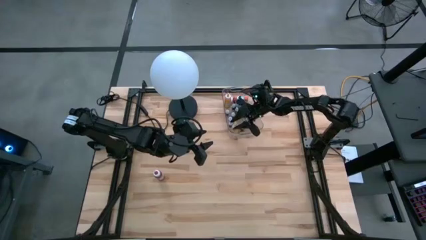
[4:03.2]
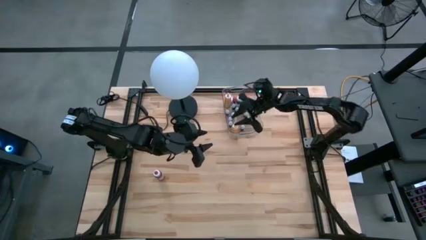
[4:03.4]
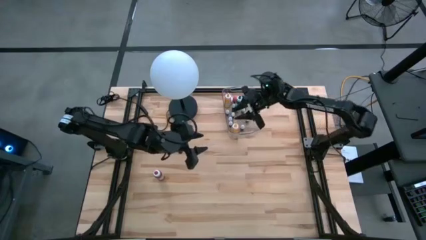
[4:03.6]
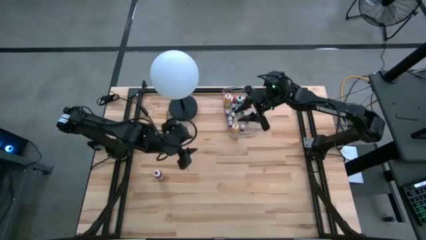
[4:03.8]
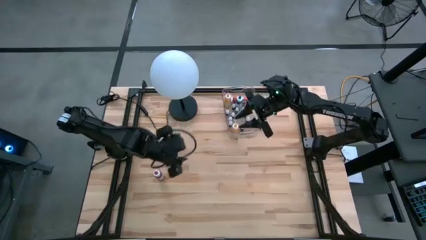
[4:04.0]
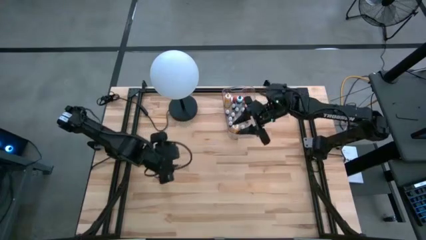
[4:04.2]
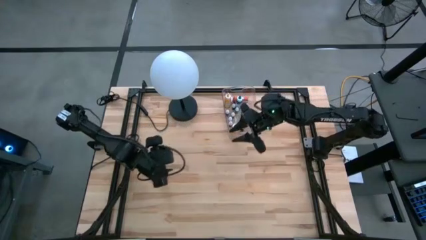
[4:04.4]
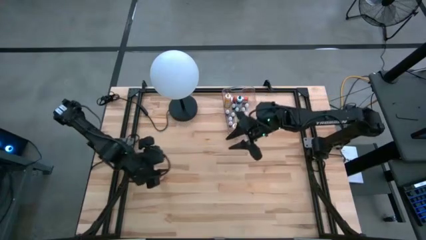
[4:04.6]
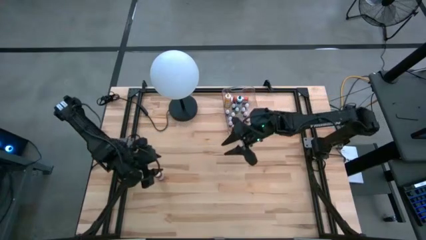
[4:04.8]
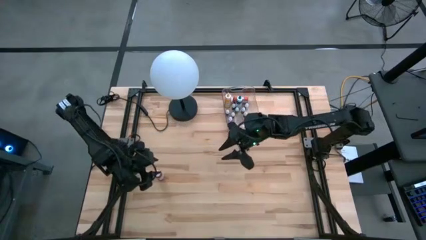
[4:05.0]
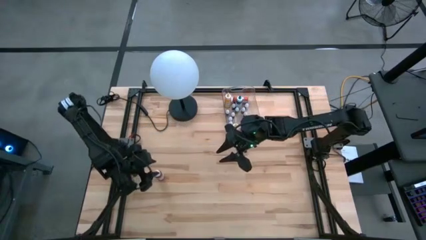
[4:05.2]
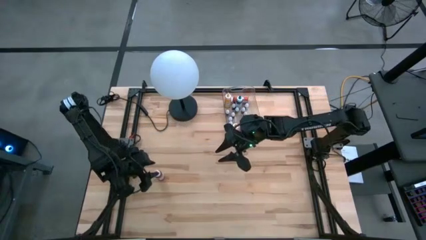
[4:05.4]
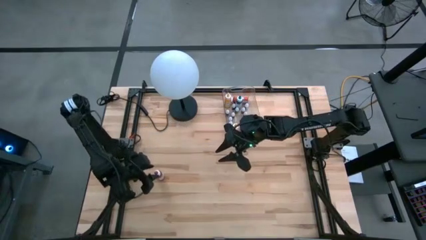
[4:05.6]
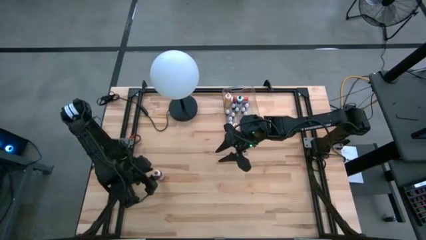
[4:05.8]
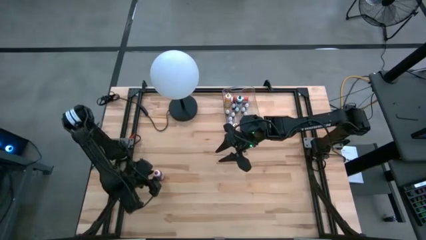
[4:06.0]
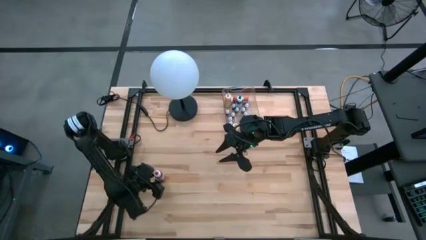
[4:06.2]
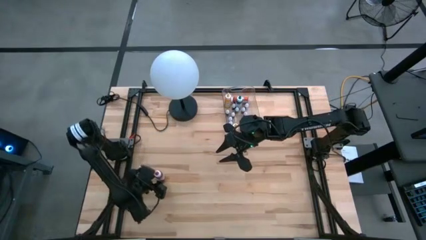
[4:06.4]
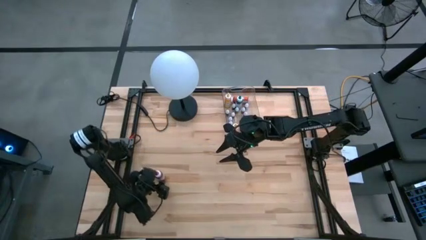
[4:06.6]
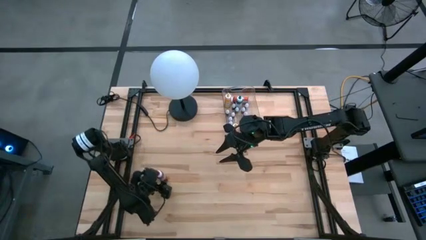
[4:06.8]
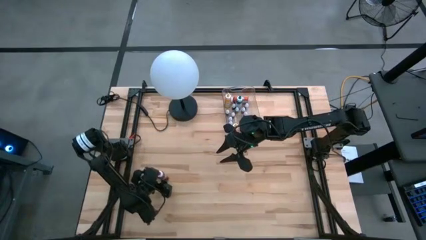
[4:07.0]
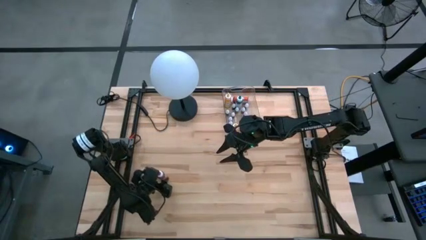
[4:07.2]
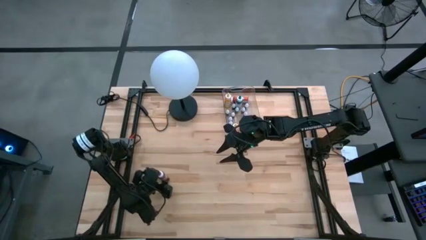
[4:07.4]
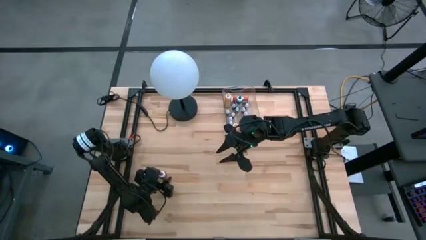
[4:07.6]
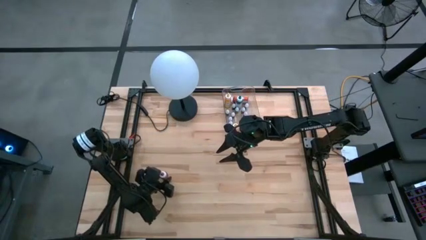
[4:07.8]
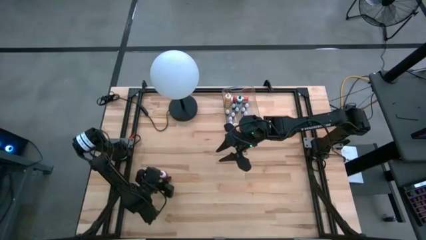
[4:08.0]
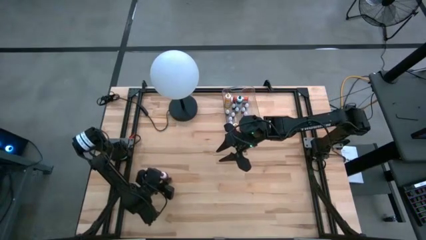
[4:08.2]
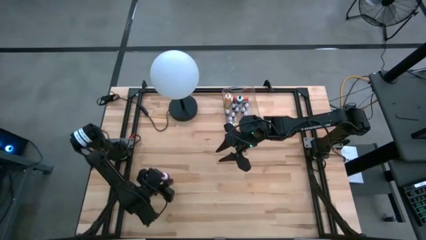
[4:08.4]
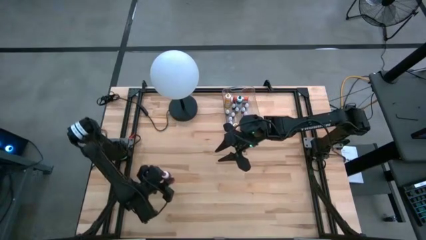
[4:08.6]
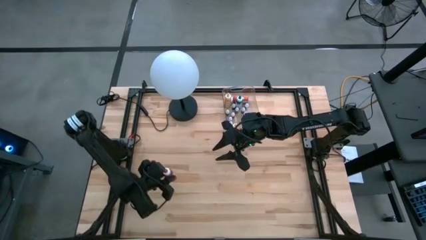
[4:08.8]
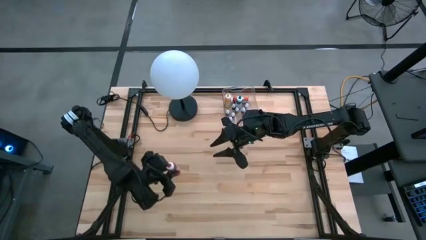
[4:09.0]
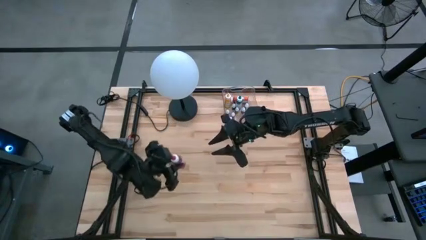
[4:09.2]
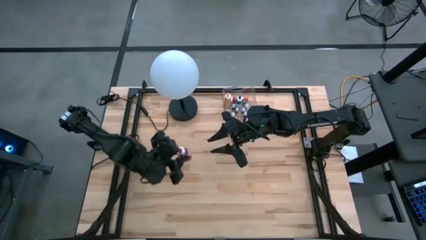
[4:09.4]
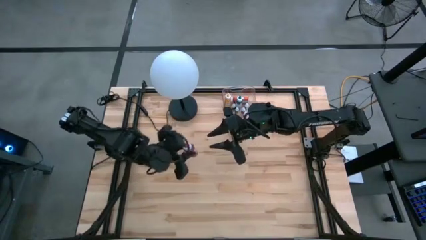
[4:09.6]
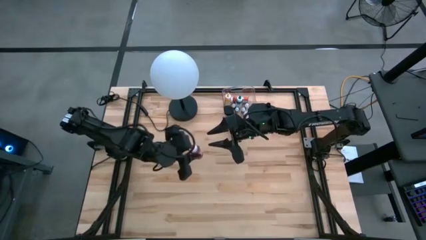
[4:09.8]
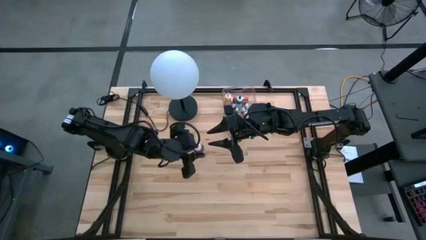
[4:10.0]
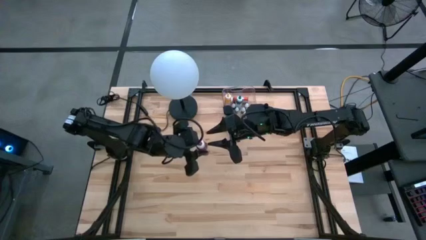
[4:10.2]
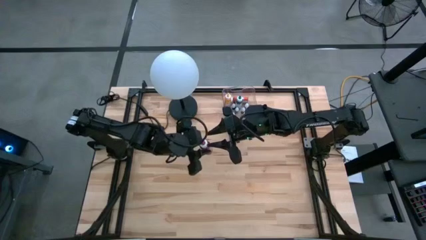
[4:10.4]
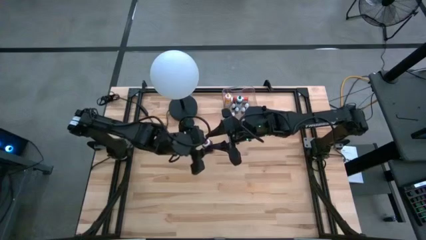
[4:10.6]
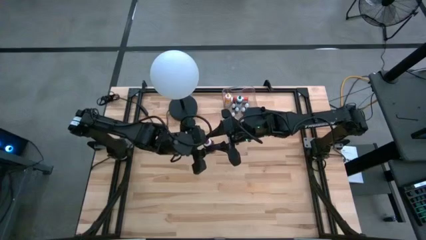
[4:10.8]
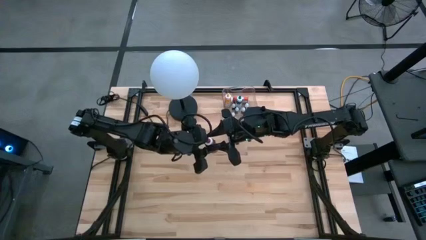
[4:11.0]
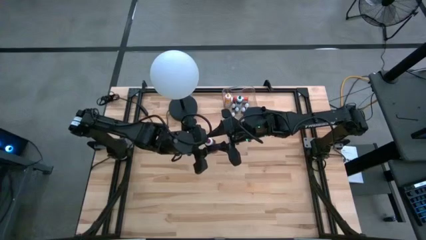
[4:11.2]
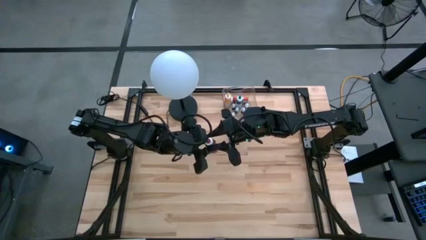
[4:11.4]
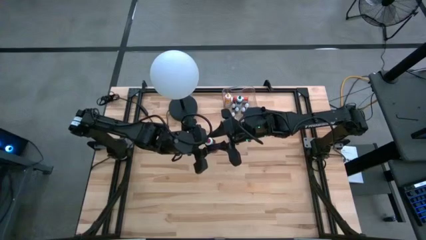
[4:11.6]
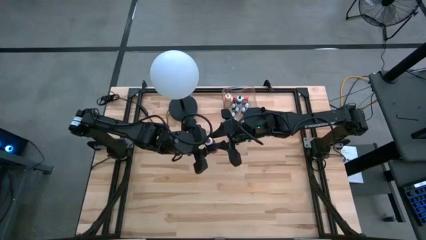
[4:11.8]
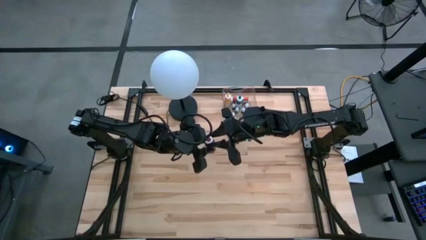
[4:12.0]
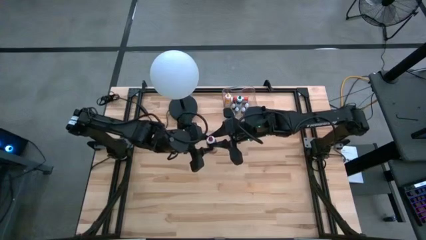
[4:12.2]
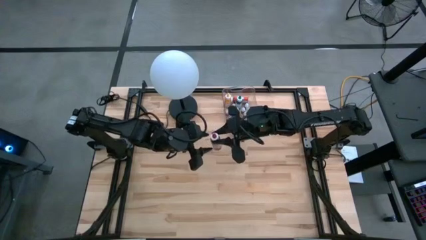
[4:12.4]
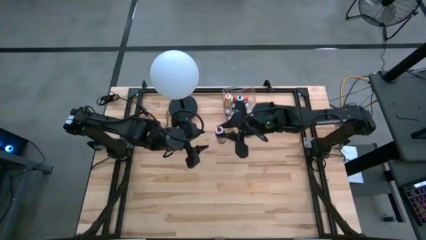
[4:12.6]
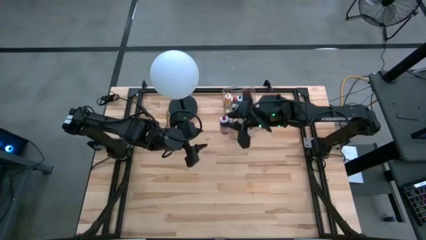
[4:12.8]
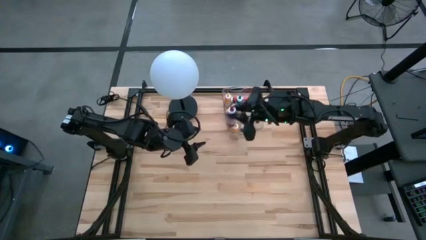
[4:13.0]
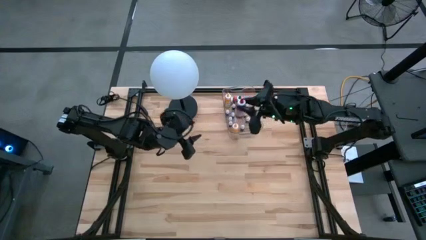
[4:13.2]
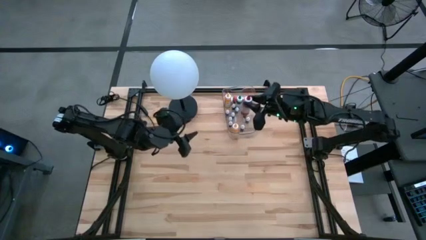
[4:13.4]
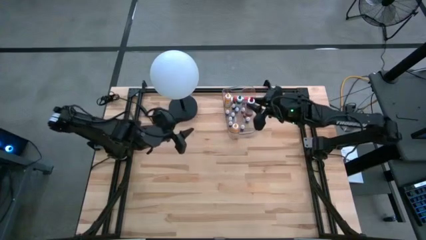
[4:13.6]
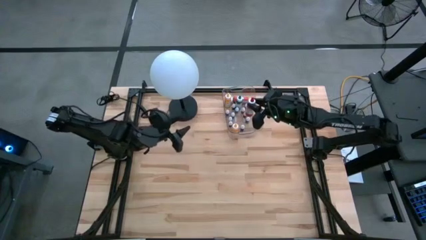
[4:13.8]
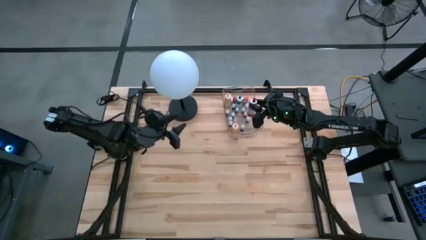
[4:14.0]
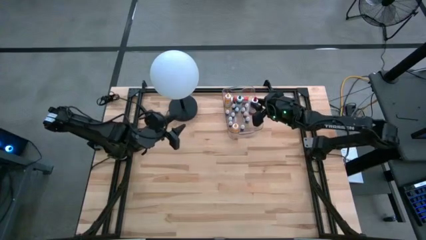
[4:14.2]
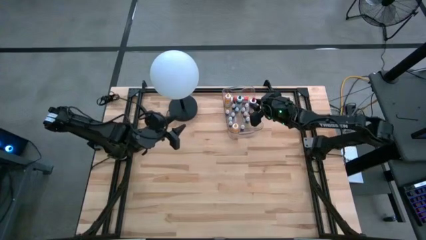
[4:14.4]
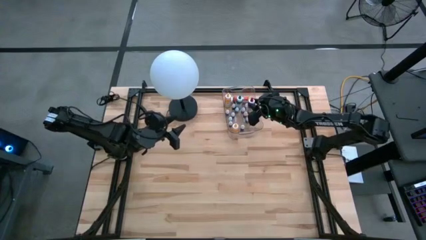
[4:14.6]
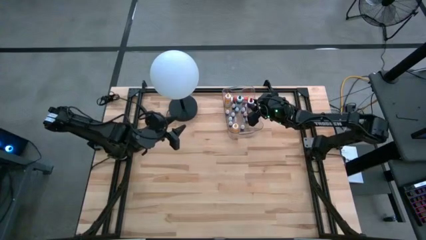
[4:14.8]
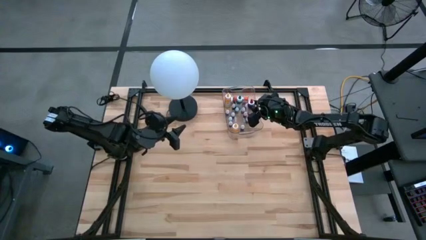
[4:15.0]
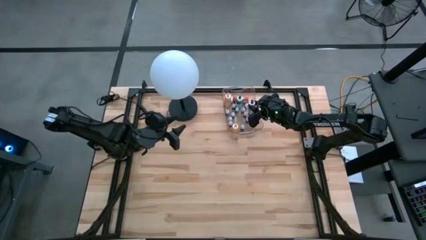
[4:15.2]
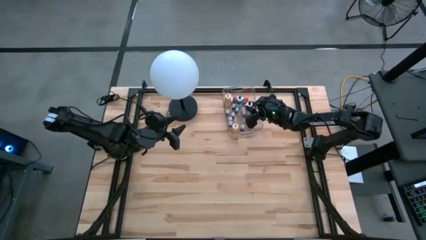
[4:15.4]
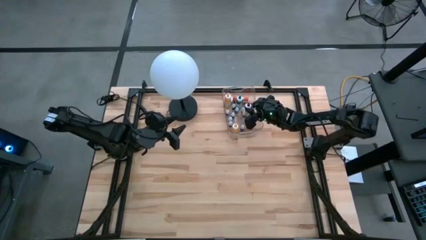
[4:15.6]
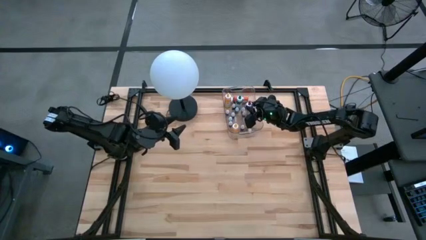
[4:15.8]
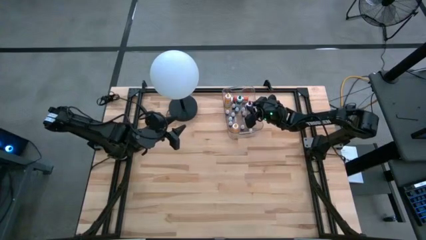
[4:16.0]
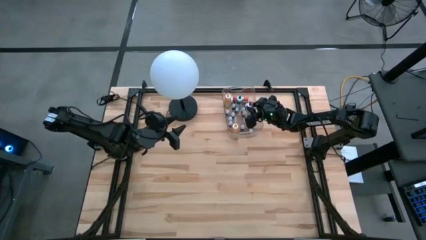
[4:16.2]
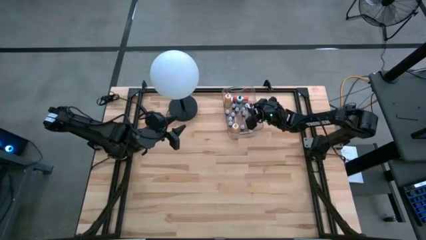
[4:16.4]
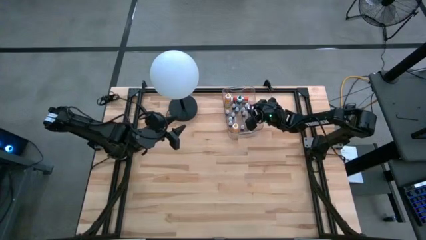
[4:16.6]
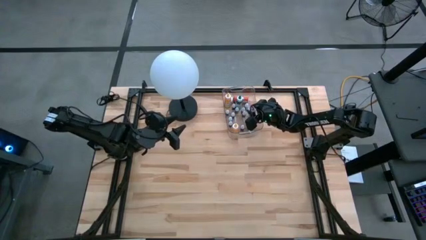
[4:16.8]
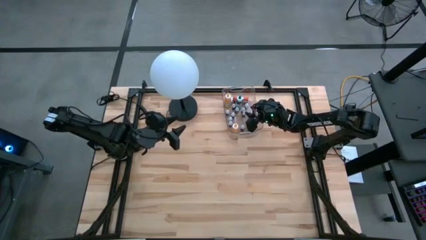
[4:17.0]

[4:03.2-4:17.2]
Task: Pick & Place food coloring
Put the large red food coloring bottle into the transparent bin

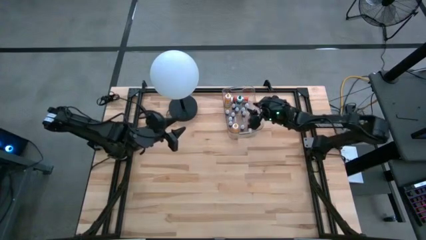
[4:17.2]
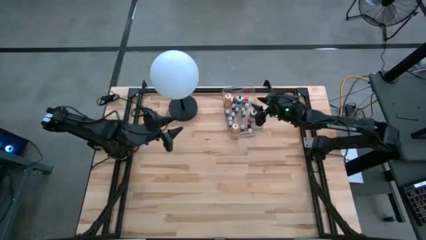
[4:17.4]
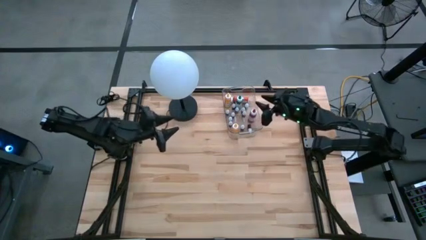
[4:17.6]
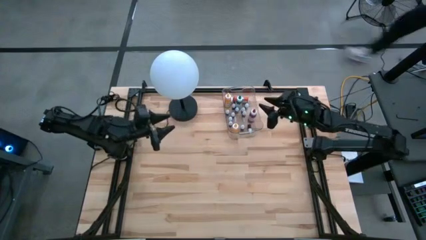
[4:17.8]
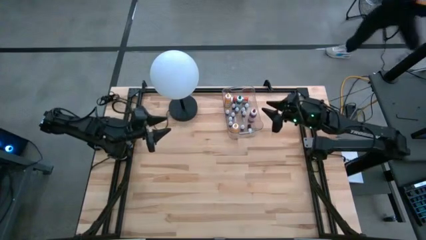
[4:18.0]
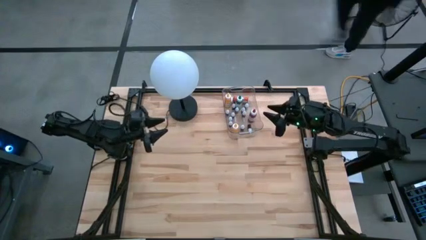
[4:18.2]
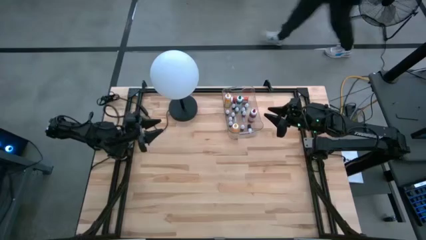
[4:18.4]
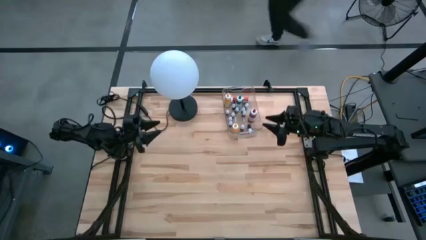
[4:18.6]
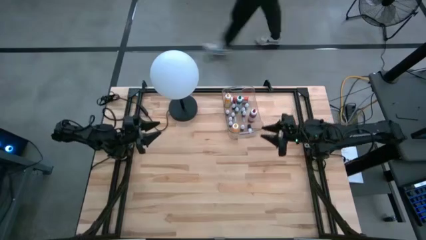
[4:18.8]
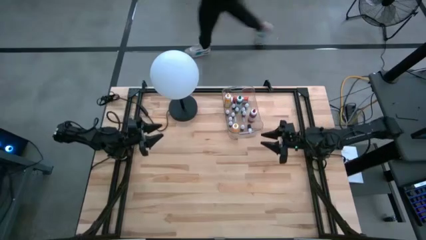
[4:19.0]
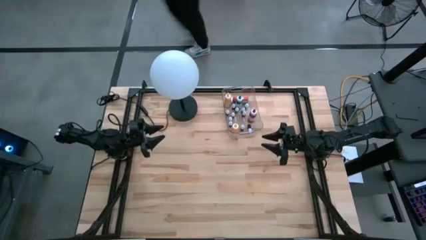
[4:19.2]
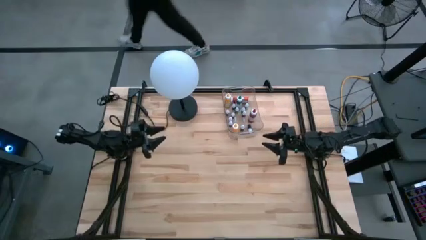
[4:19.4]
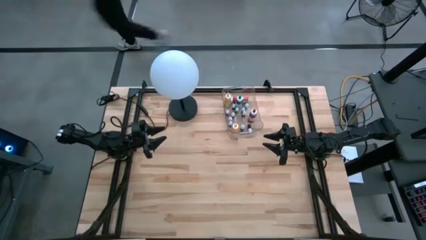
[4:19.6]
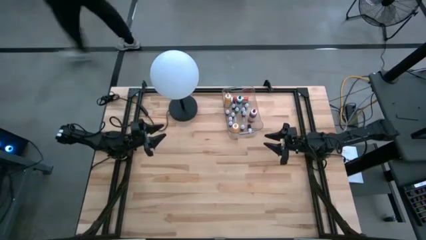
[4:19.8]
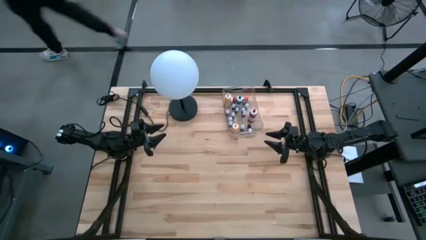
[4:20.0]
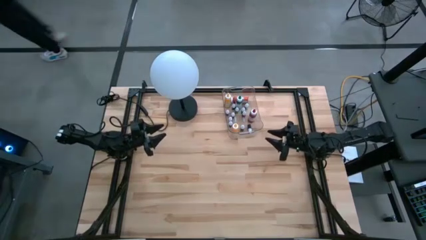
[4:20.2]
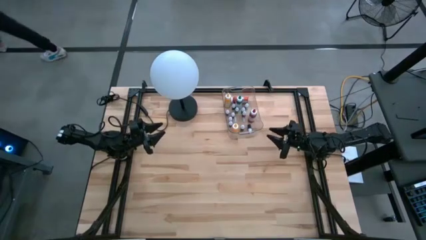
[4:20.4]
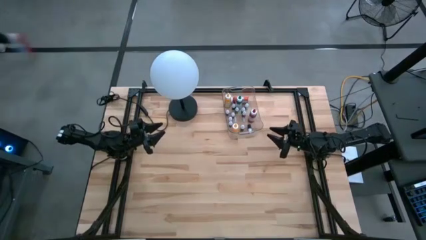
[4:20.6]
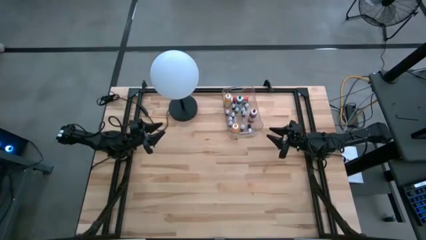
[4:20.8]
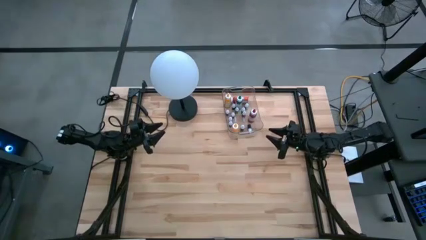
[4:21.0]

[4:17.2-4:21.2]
Return to Home Position
